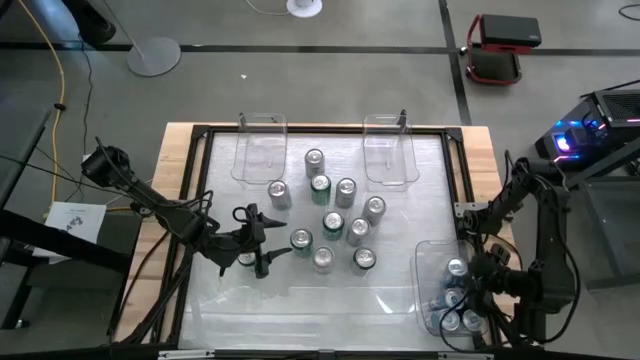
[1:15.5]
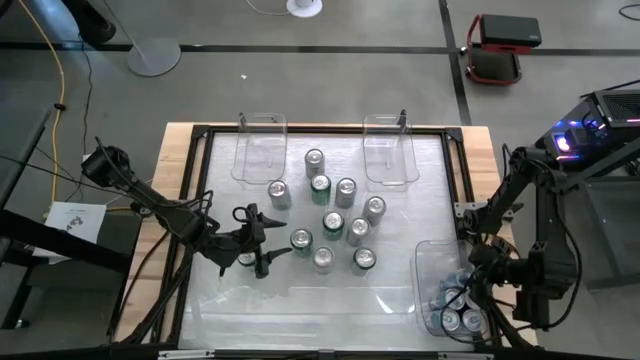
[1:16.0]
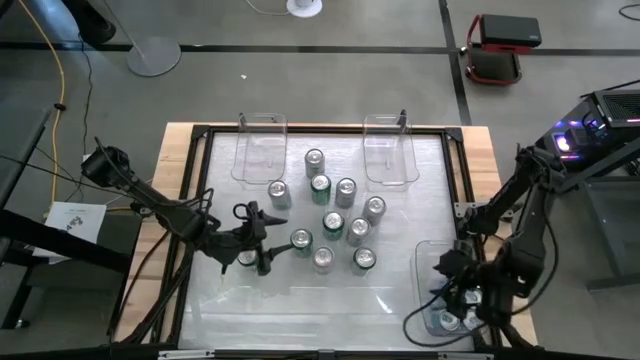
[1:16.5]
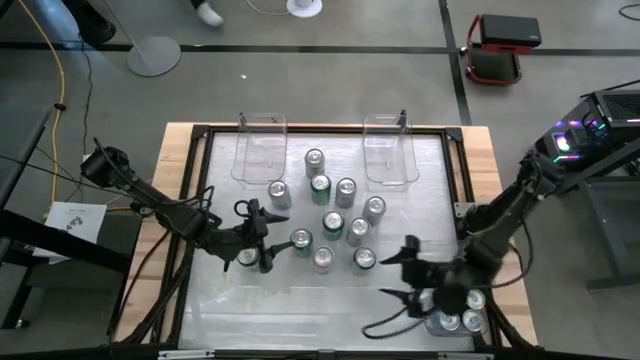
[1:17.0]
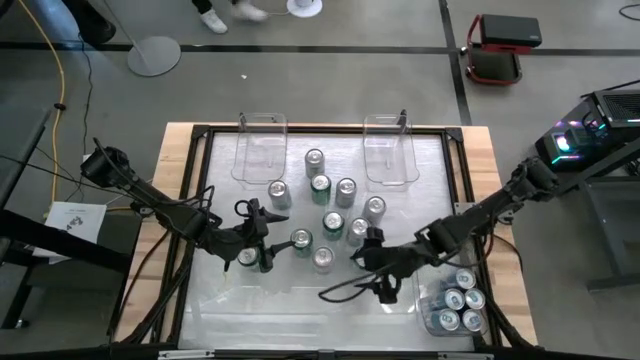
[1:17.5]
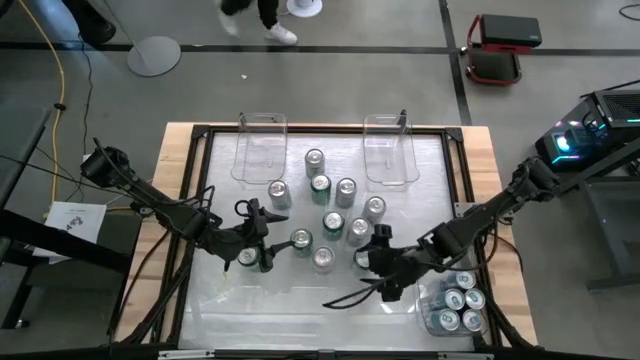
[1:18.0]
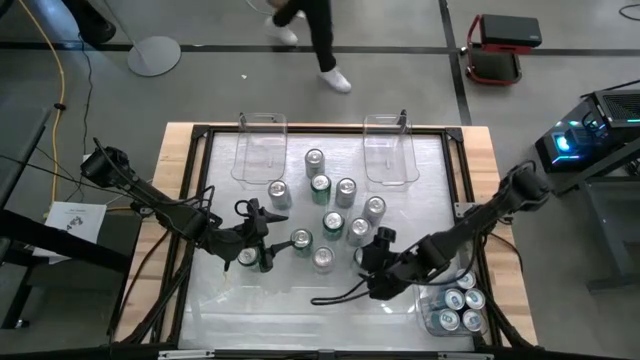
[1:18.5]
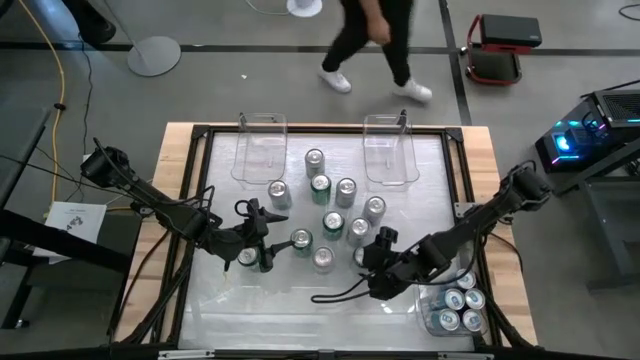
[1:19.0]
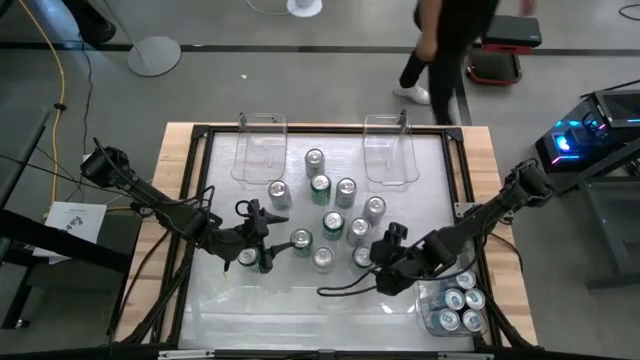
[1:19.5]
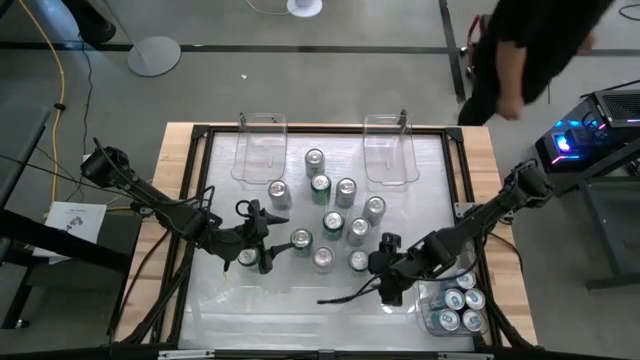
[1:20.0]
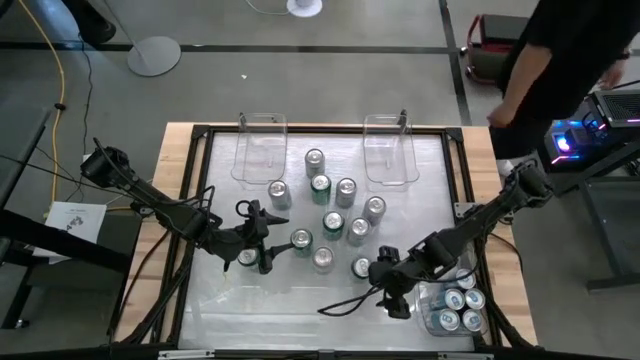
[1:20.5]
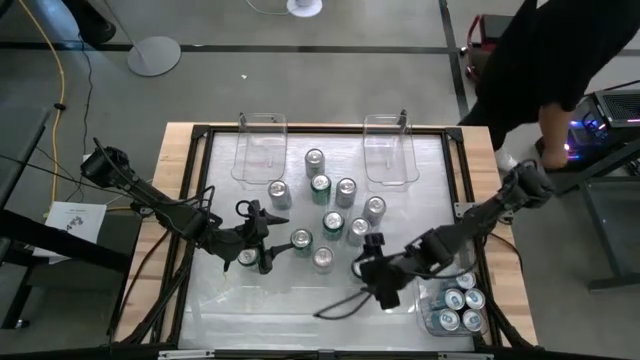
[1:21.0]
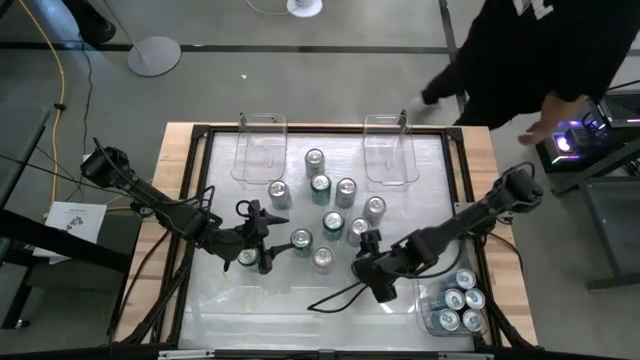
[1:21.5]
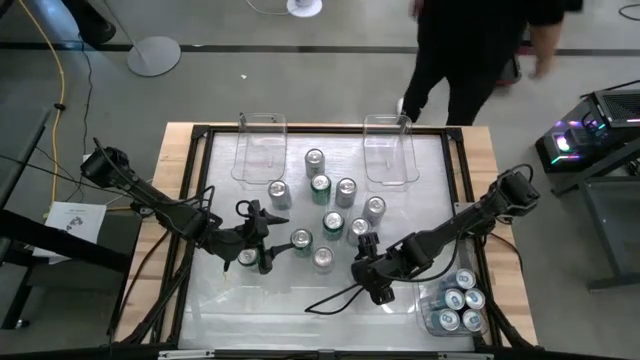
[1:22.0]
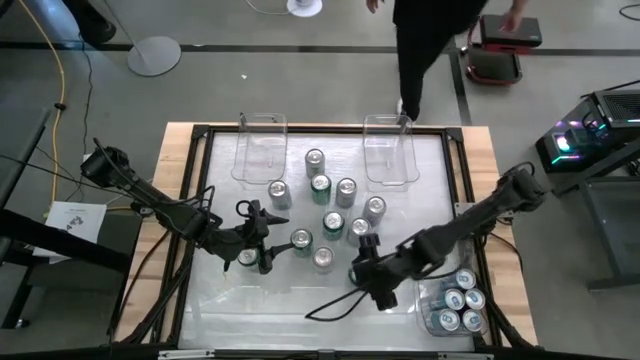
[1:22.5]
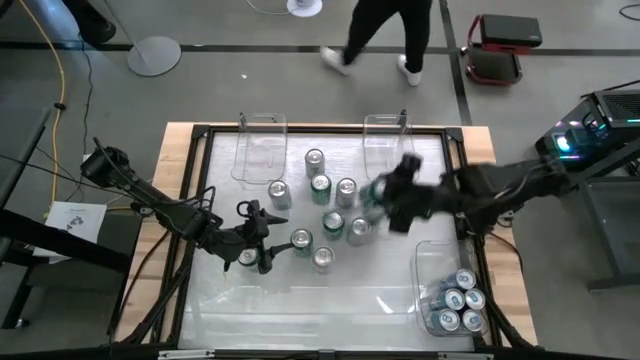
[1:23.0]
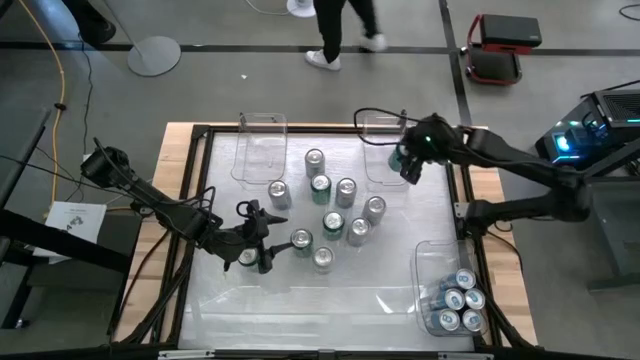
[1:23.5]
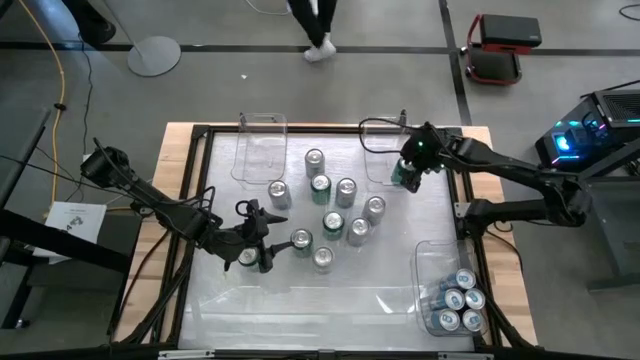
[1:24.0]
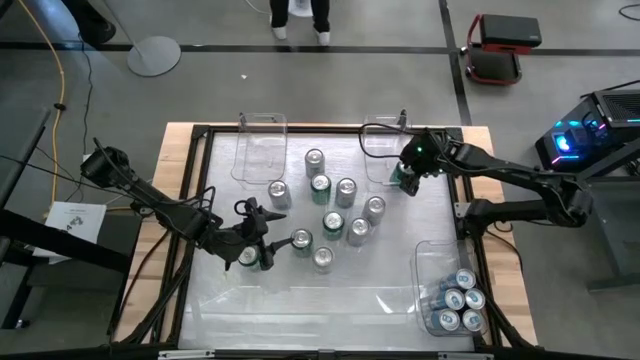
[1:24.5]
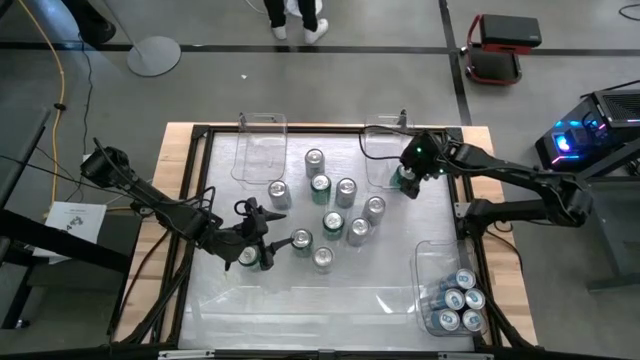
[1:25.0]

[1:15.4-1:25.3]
Task: Sort soda cans
Put the green soda can into the top right transparent bin

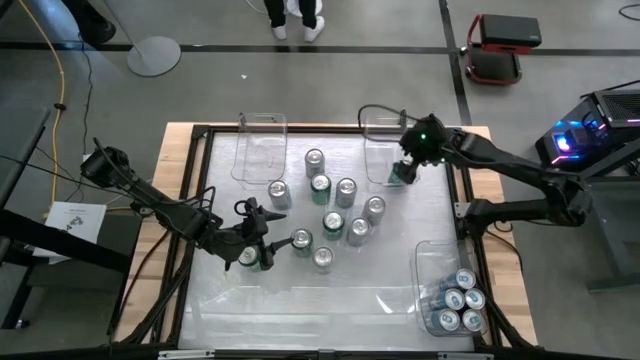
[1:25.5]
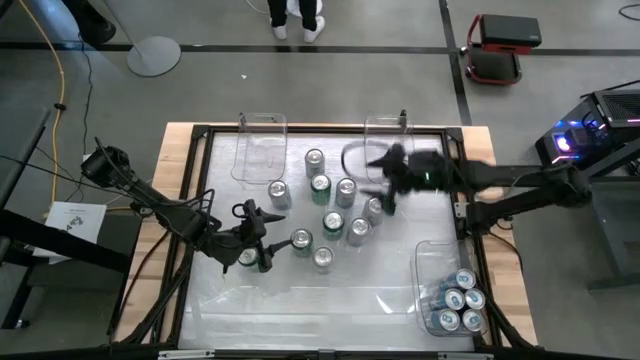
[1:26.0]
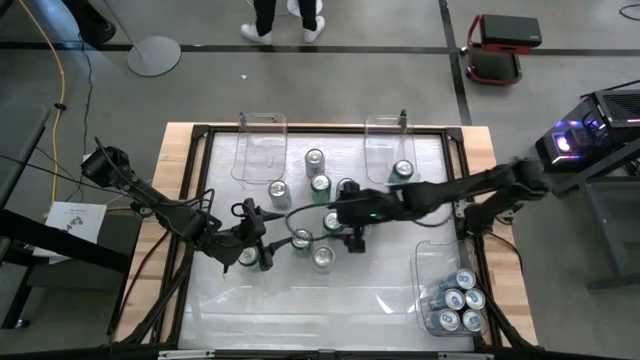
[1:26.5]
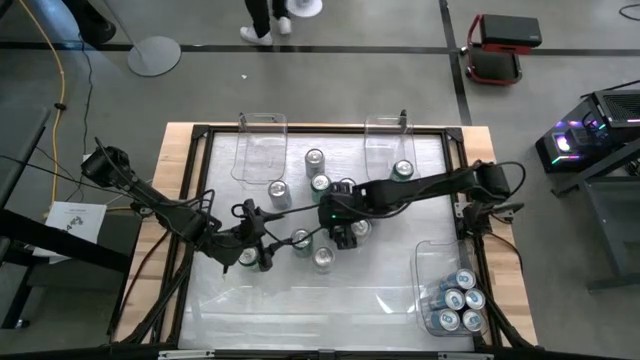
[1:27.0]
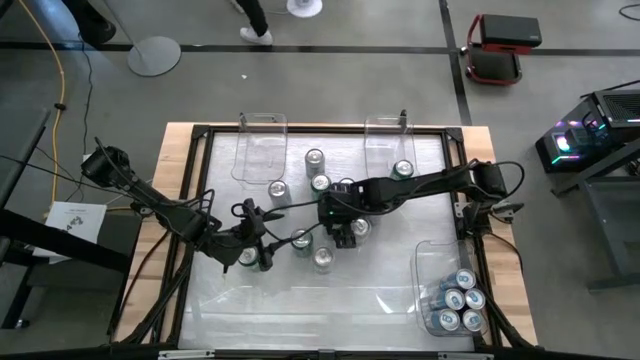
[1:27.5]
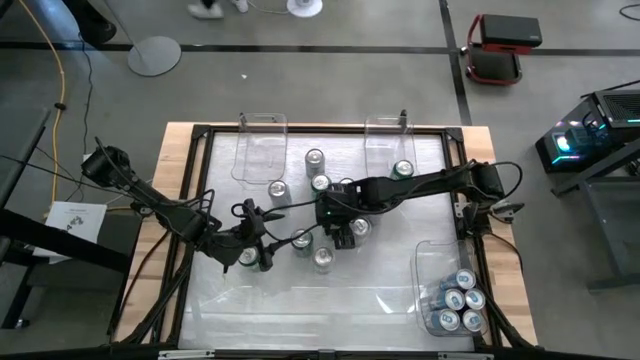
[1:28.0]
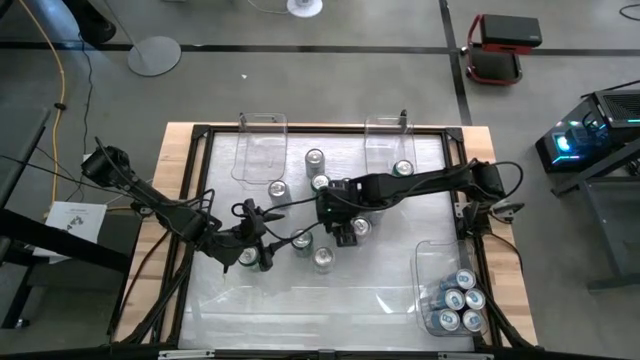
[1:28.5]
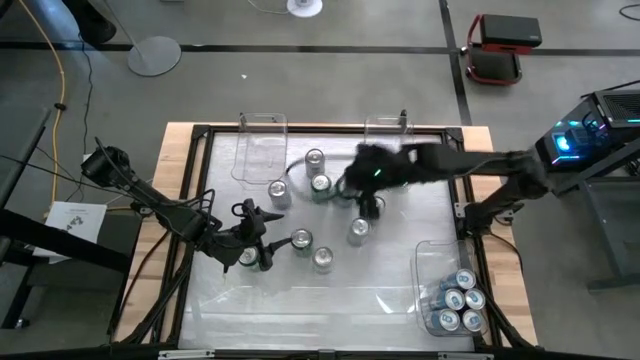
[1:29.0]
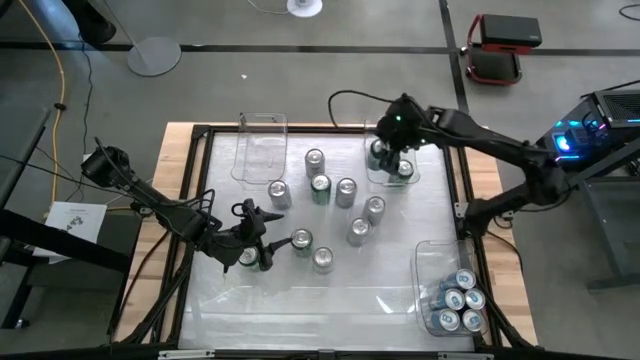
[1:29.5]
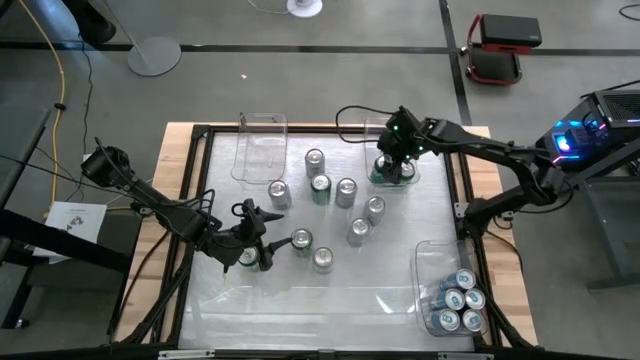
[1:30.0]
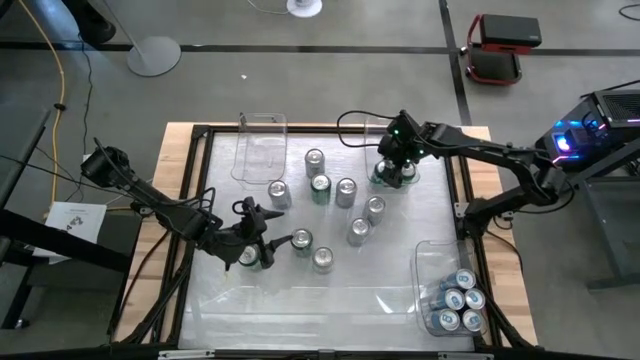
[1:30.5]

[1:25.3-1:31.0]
Put the green soda can into the top right transparent bin

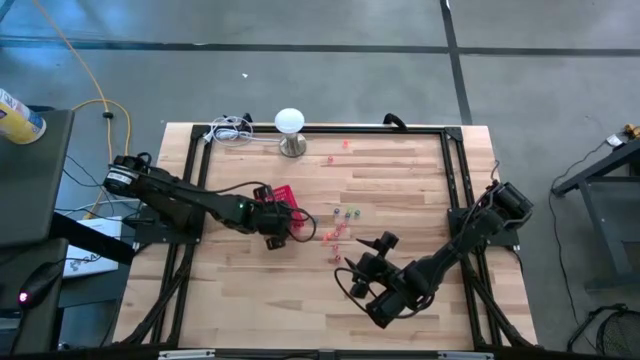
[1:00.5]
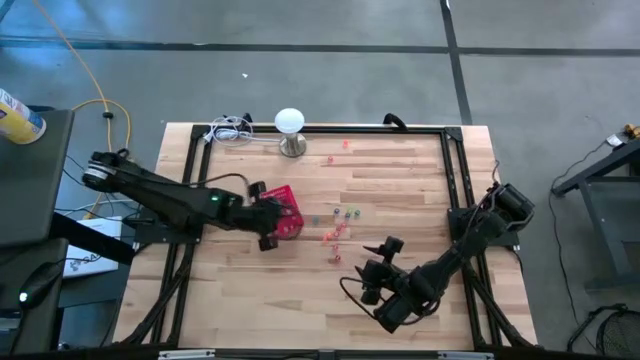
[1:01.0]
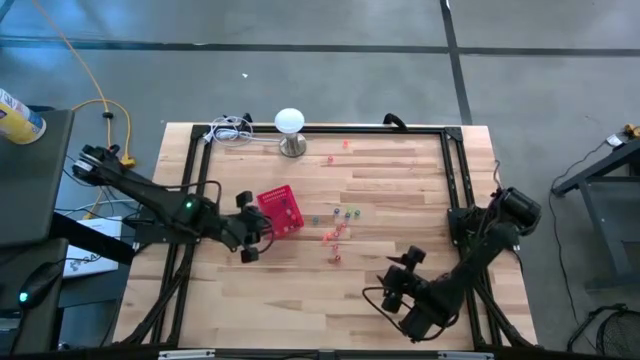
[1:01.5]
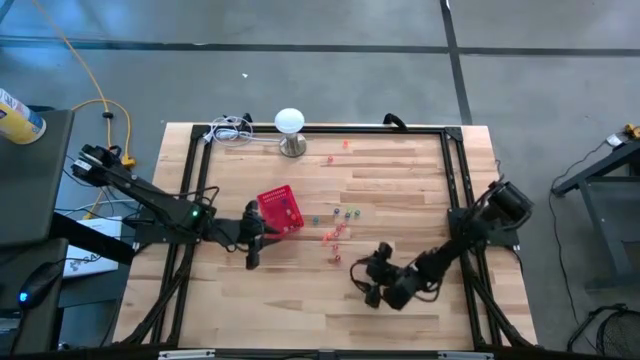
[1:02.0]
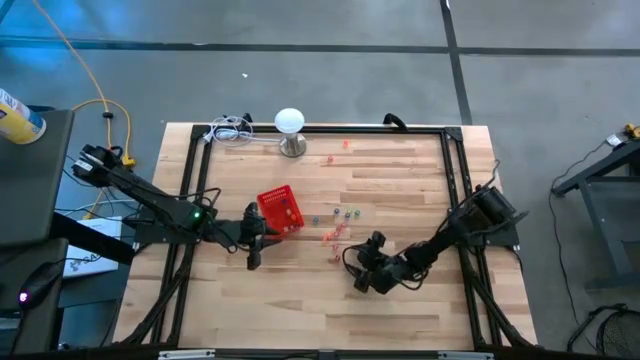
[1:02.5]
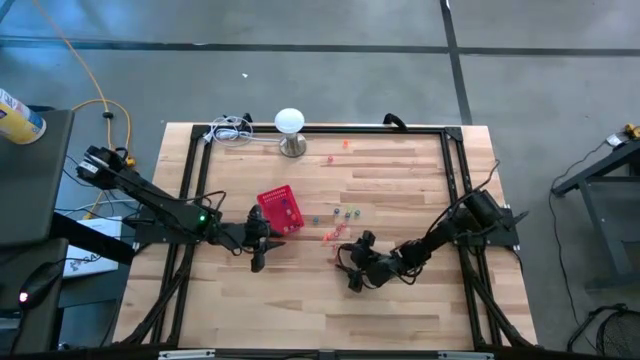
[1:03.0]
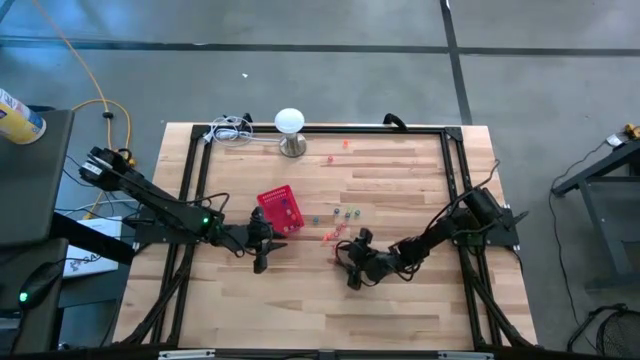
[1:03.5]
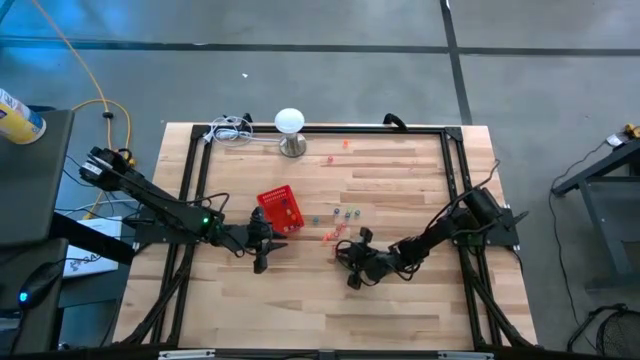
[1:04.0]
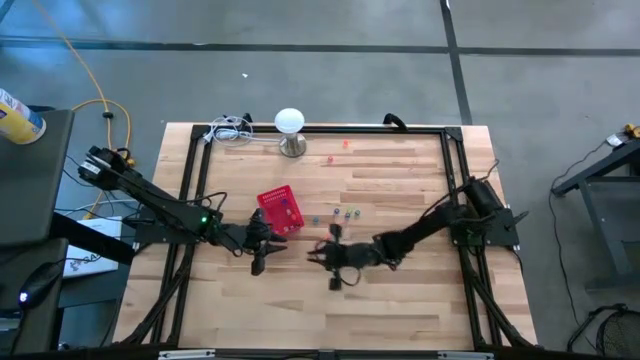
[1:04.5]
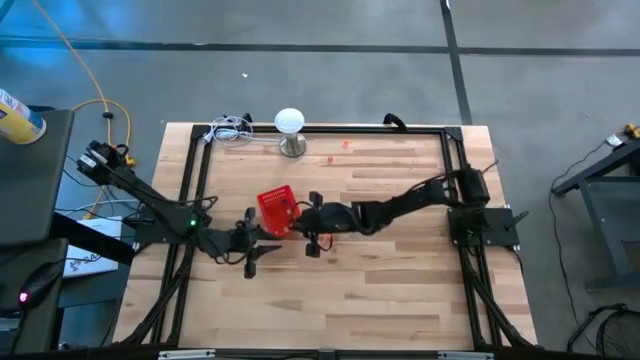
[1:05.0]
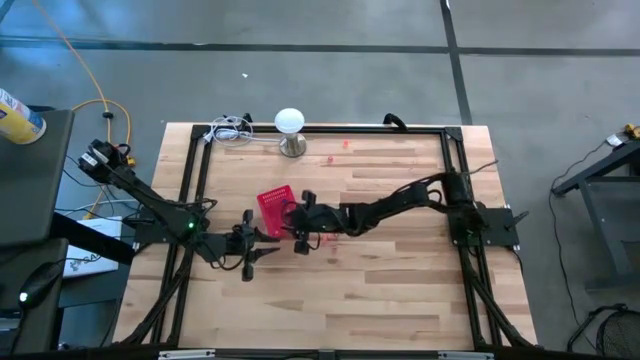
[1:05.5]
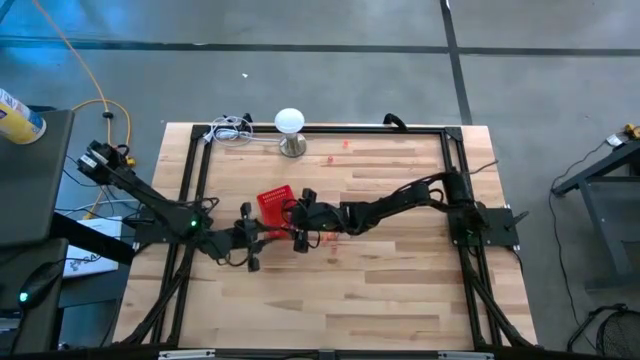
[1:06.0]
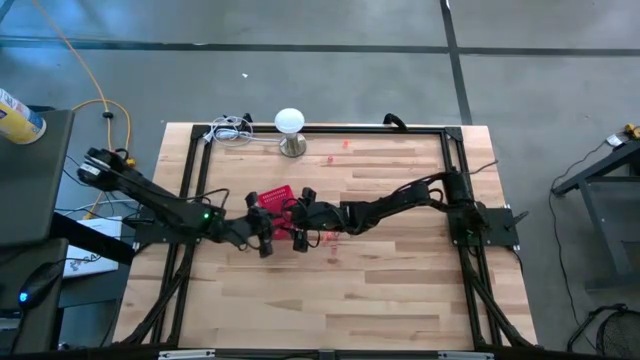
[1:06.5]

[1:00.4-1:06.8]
Task: Pick & Place Dice
Put the red die into the red basket
